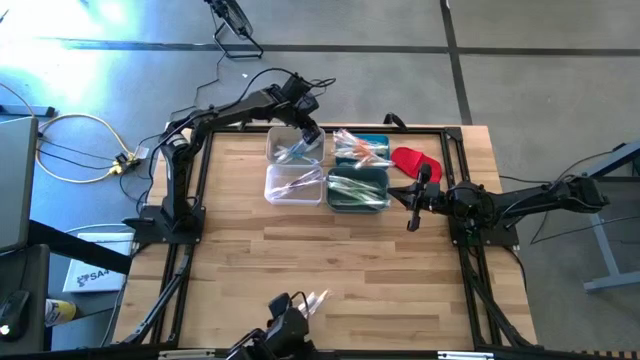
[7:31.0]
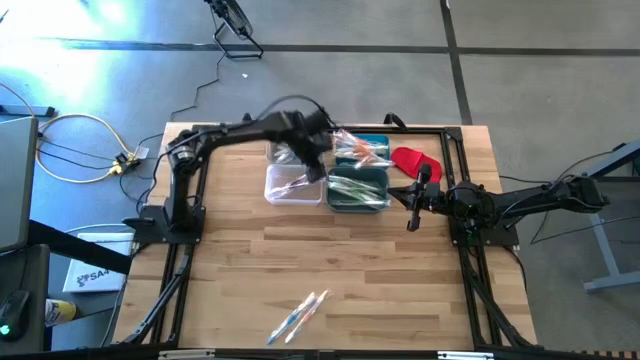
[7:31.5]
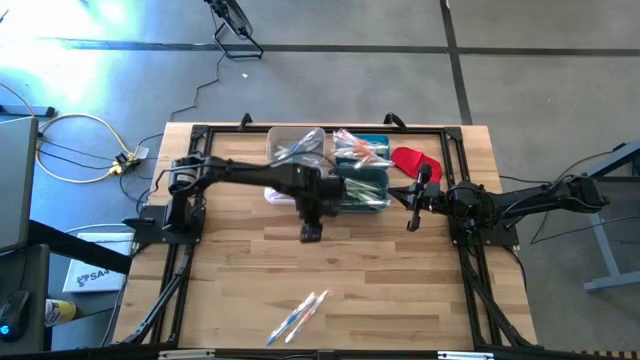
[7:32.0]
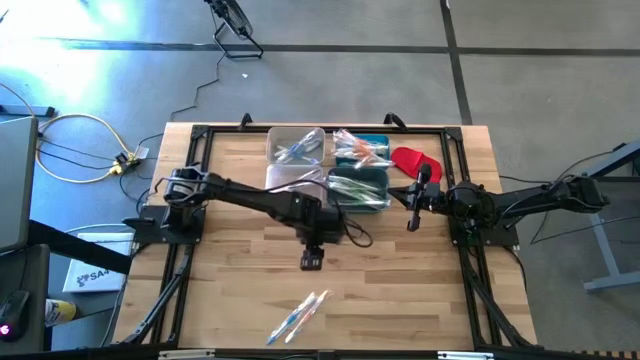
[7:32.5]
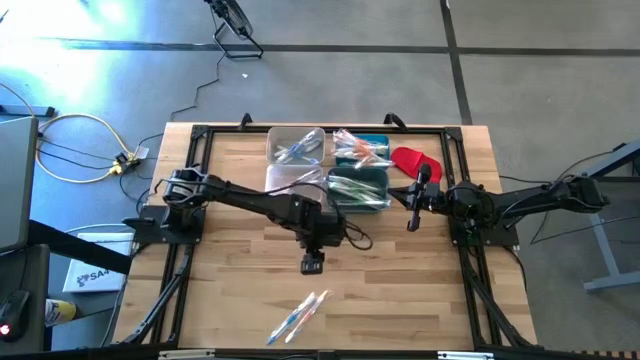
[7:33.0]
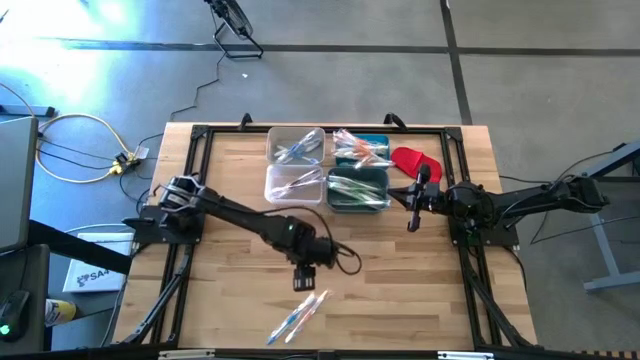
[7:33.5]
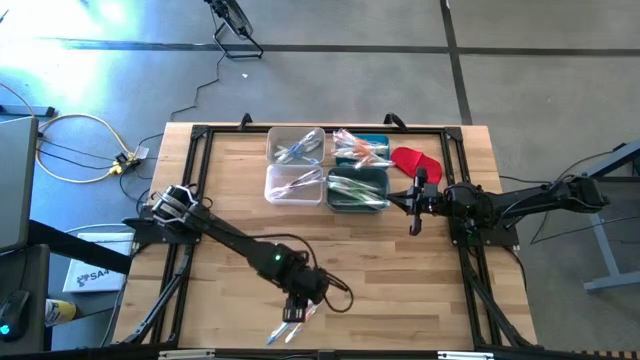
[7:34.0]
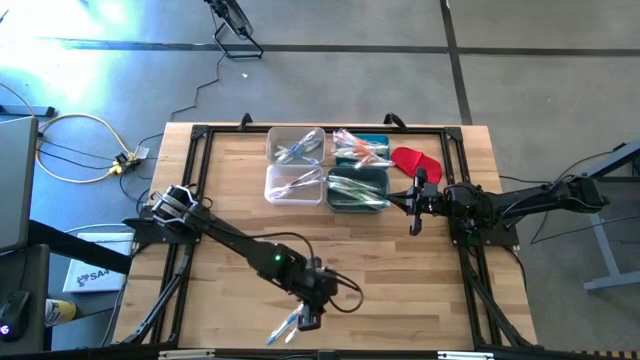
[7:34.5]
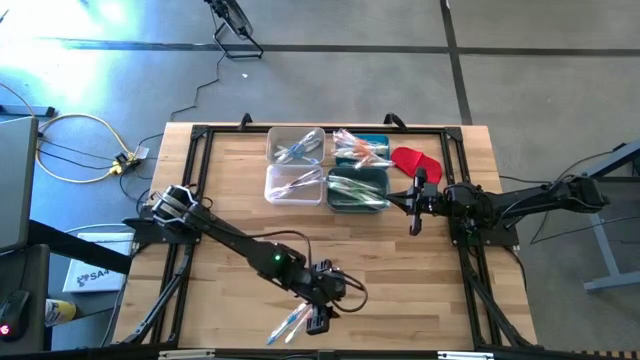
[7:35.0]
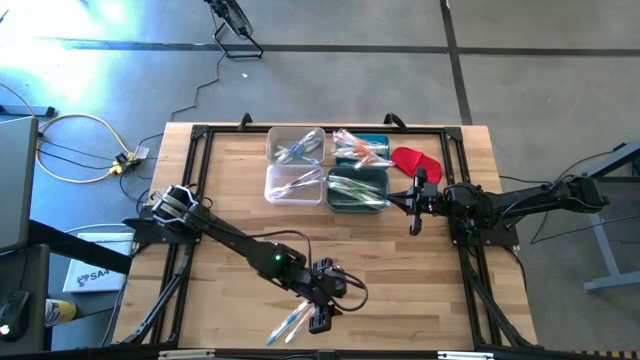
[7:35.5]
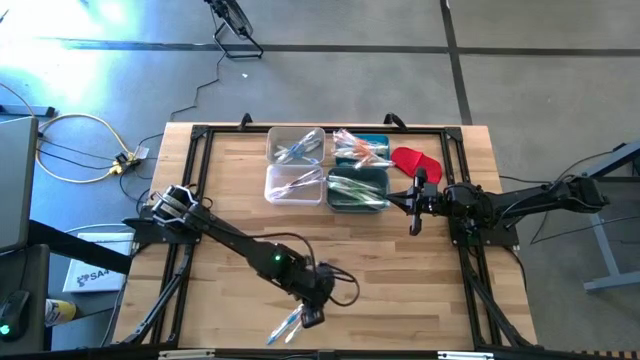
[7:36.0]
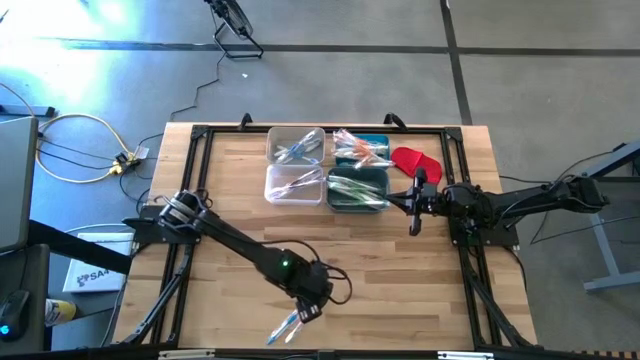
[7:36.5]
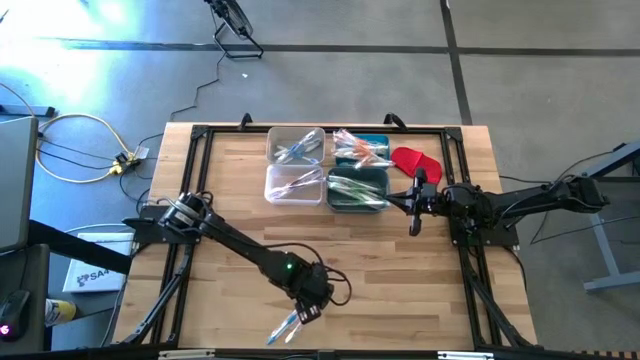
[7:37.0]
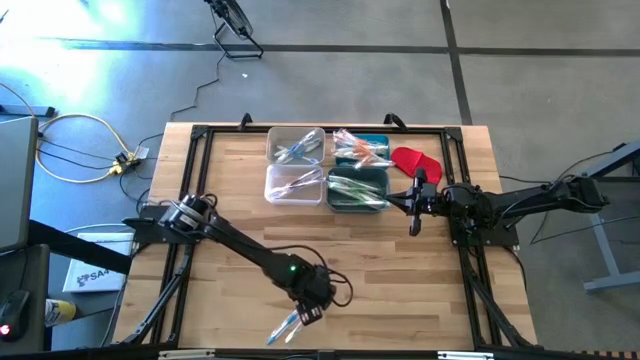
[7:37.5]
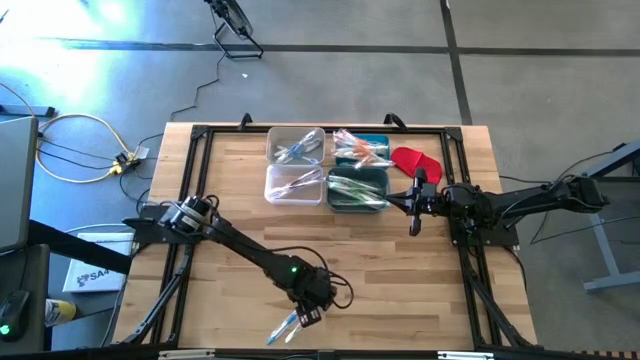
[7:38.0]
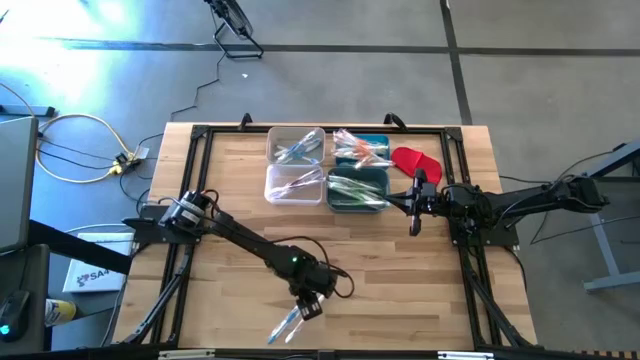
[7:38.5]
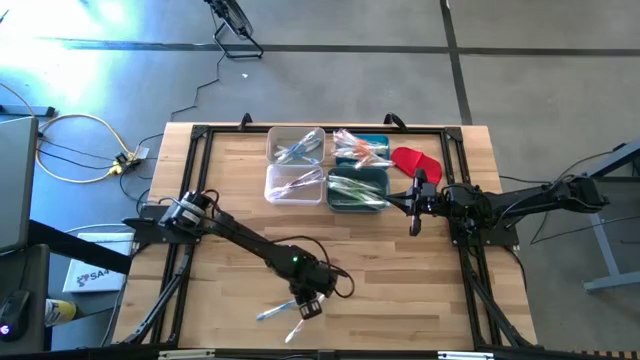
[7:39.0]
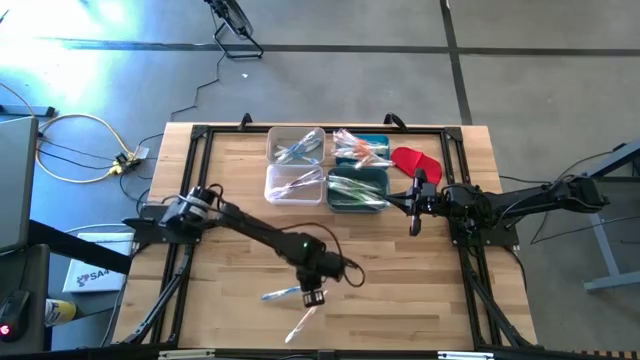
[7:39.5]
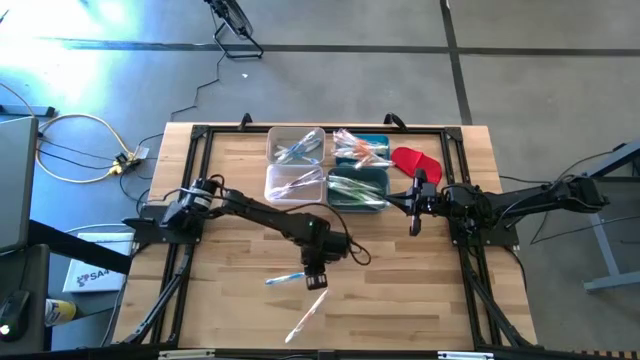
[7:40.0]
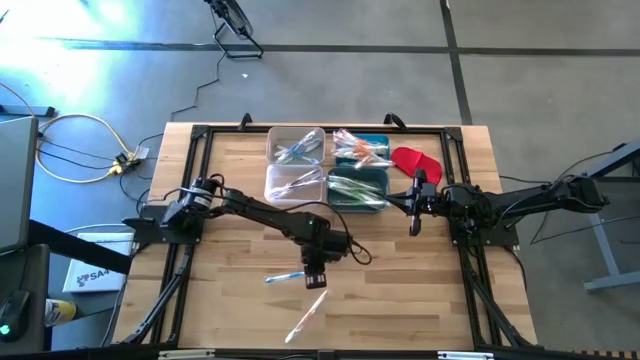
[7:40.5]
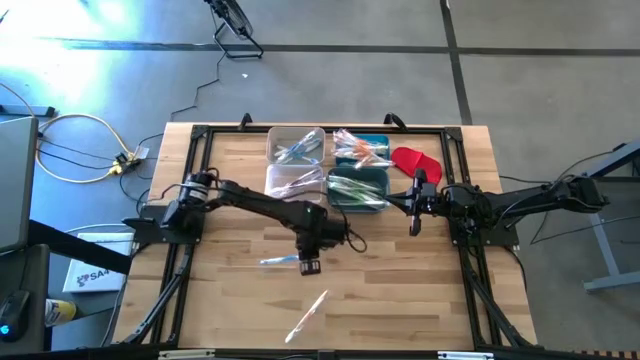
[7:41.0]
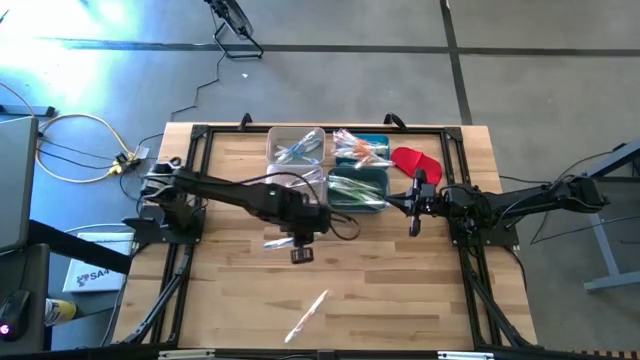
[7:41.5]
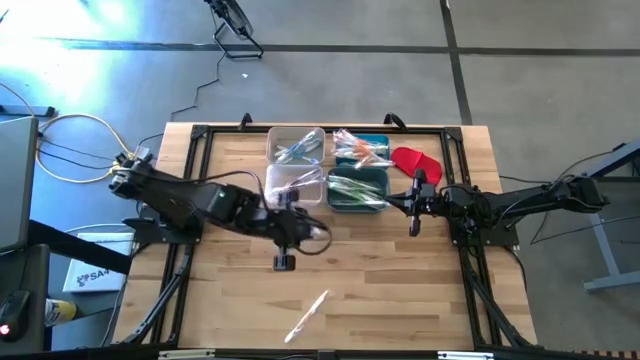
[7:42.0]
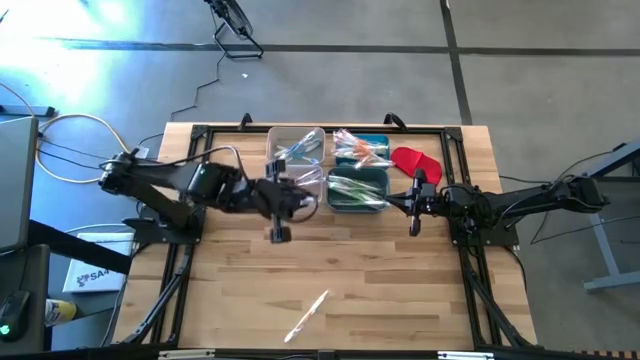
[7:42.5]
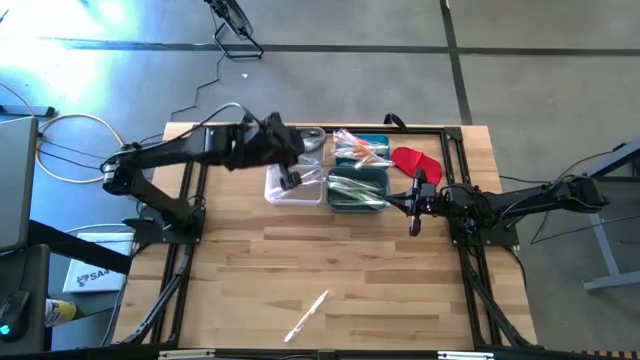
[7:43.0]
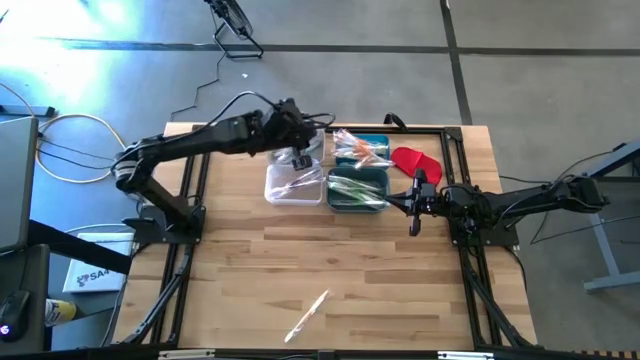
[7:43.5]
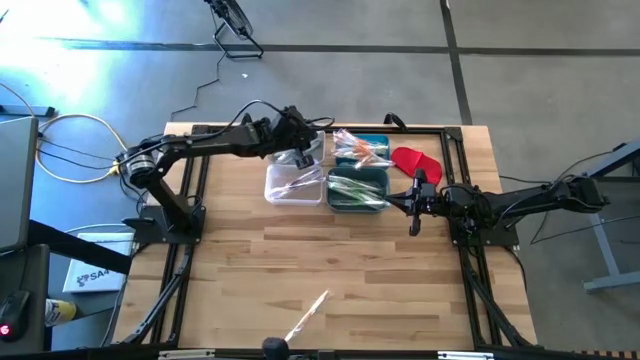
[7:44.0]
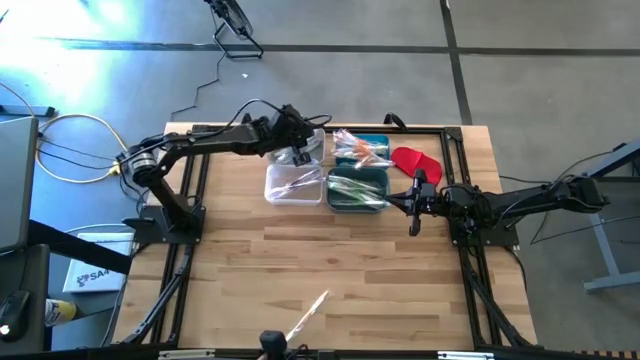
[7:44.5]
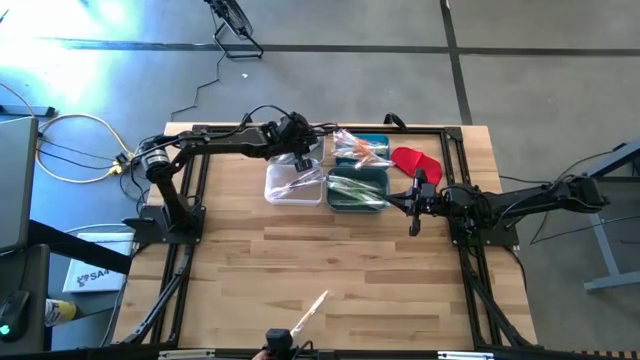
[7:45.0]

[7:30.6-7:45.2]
Task: Pick & Place Toothbrushes
Put the blue toothbrush into the white bin

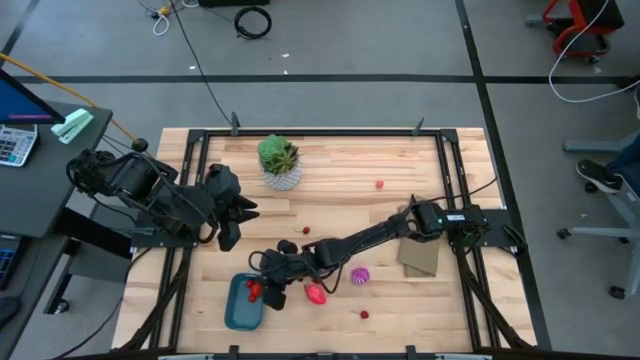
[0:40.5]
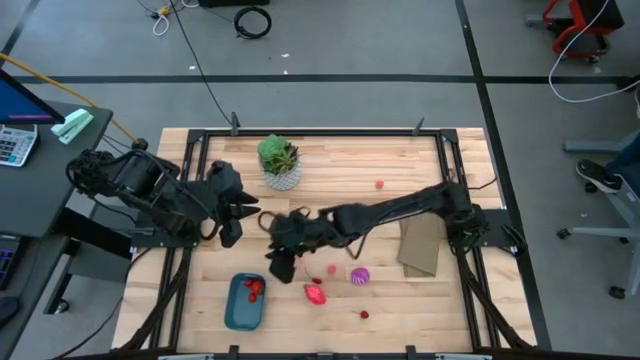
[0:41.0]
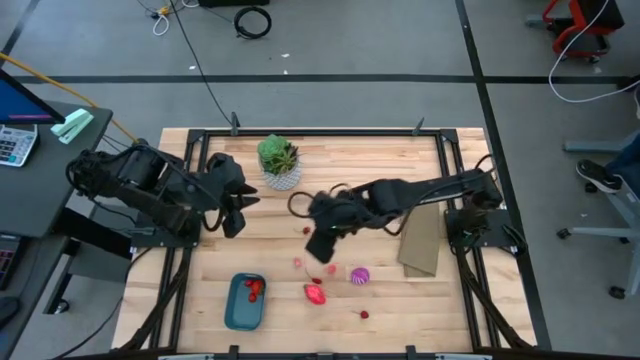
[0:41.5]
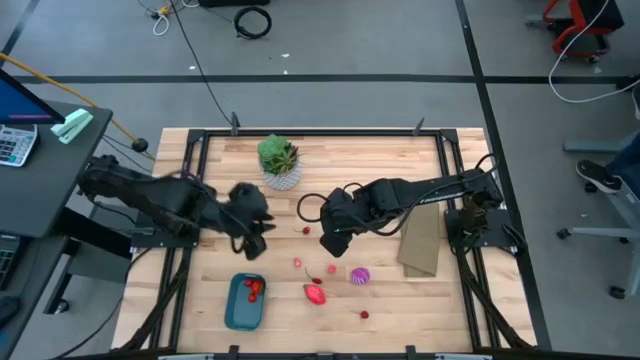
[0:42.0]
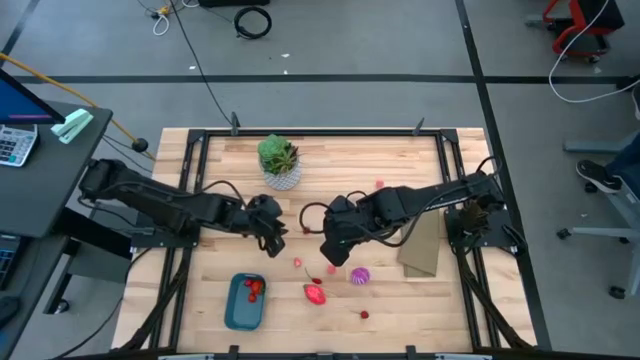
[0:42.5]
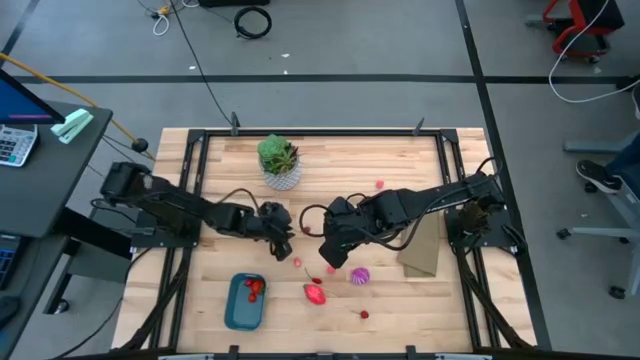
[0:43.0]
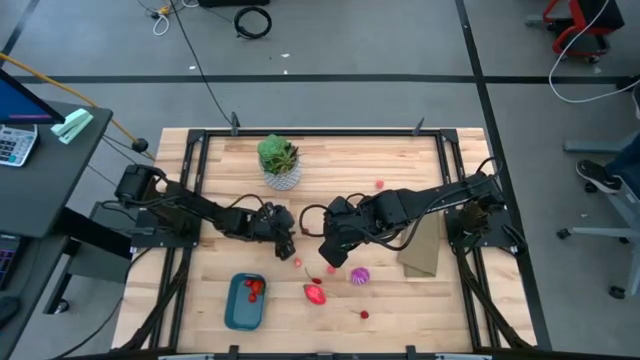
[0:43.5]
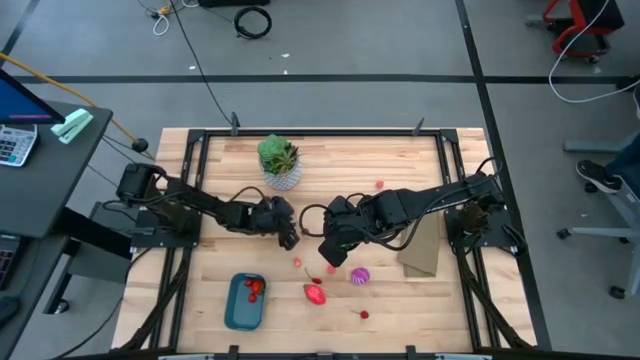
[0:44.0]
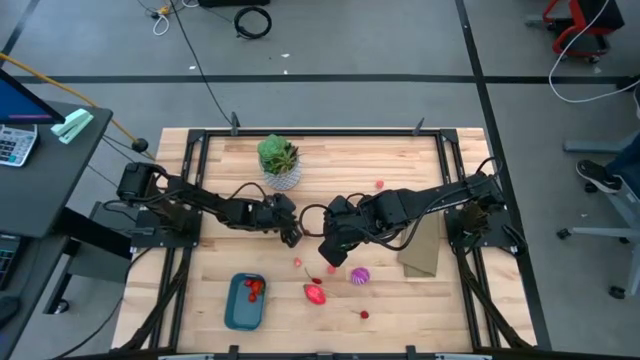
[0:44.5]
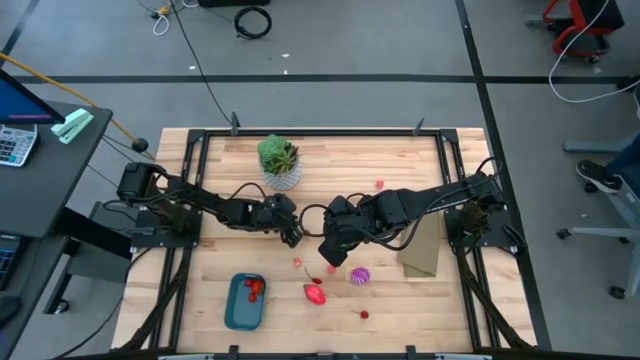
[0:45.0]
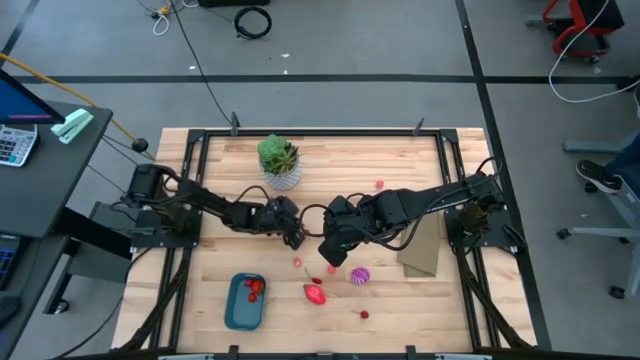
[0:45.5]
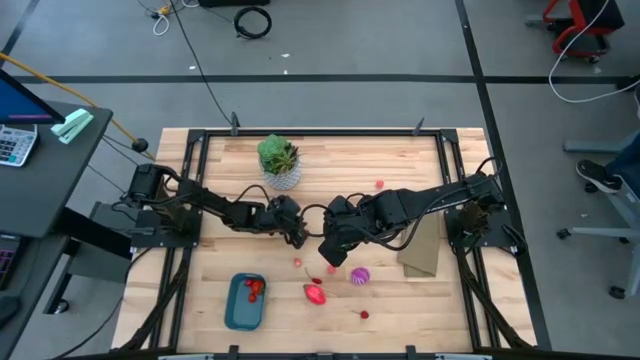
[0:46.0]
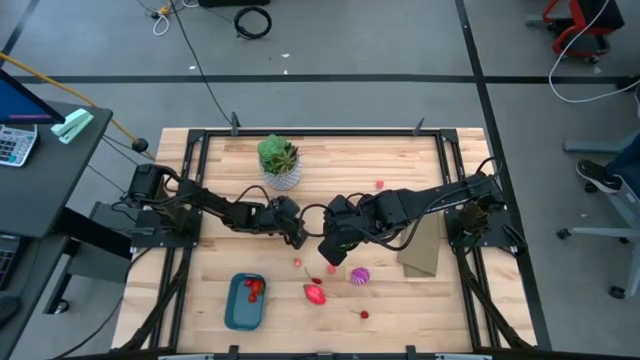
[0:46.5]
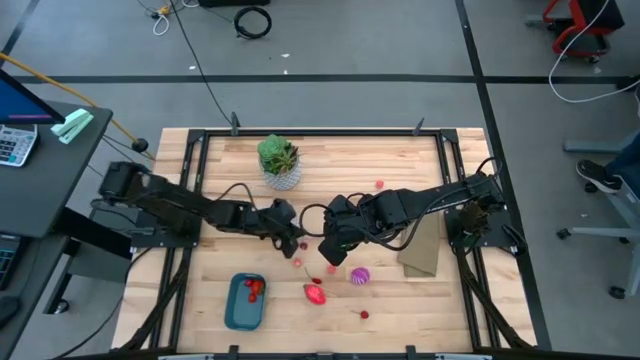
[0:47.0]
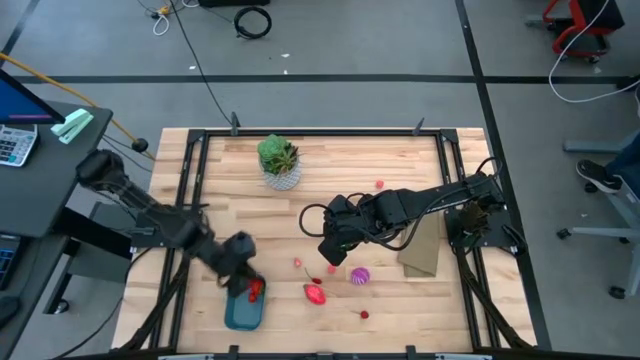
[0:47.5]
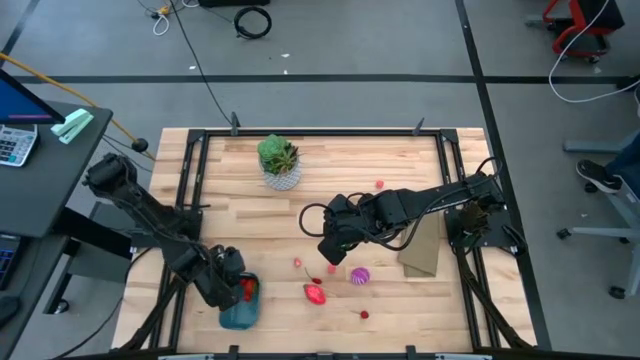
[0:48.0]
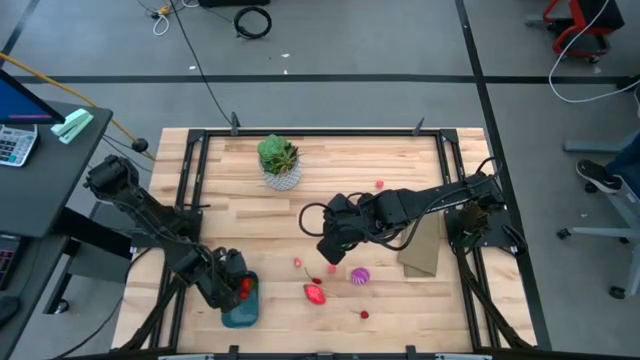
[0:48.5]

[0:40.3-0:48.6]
Task: Pick and placing Produce into tupperware
Put the top red cherry into the bin
